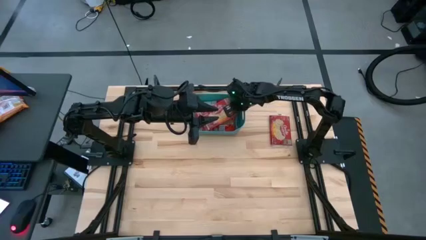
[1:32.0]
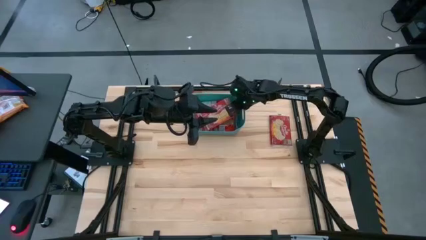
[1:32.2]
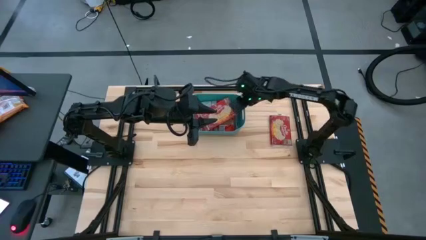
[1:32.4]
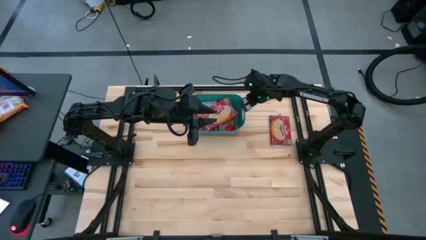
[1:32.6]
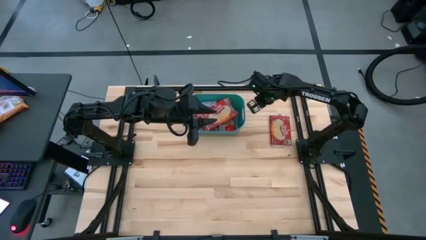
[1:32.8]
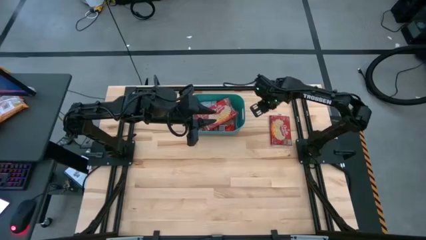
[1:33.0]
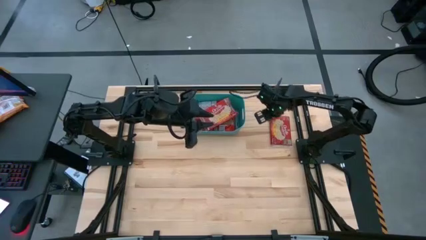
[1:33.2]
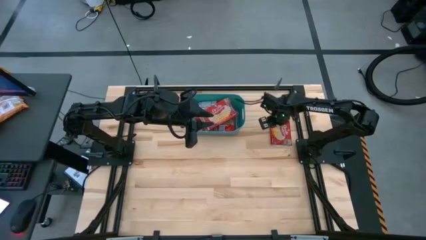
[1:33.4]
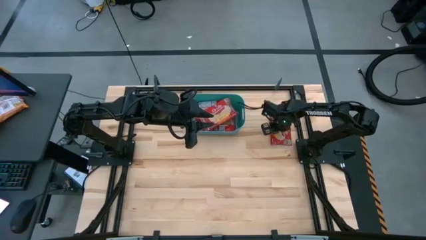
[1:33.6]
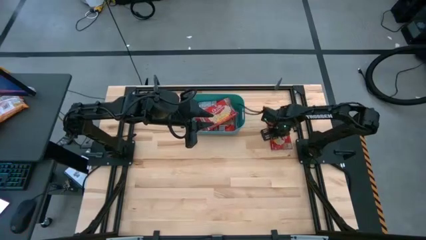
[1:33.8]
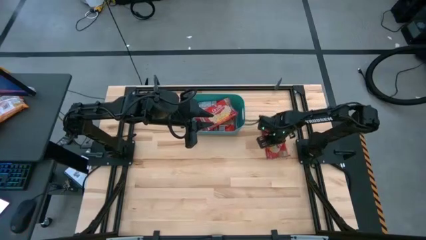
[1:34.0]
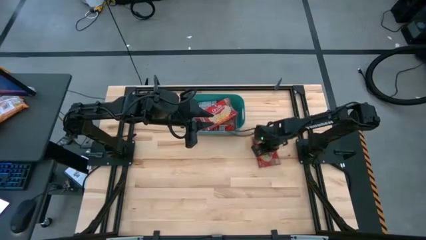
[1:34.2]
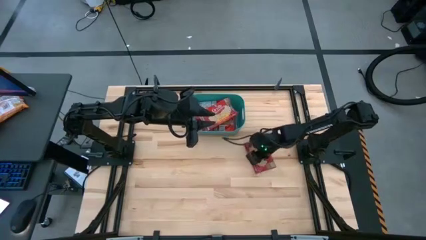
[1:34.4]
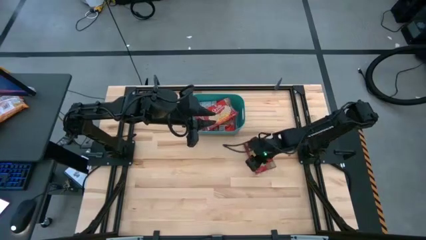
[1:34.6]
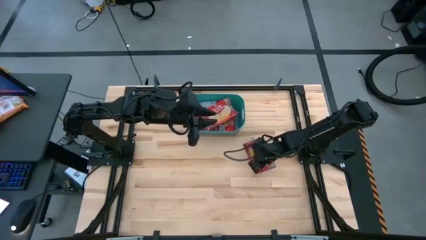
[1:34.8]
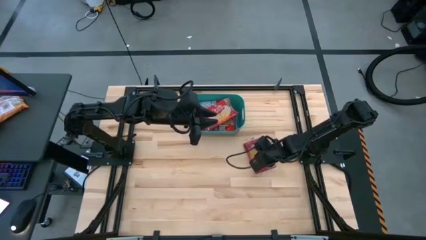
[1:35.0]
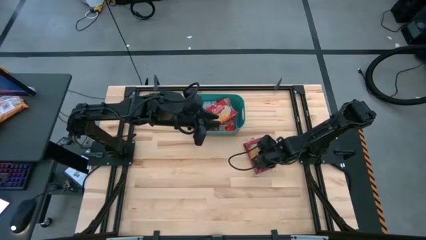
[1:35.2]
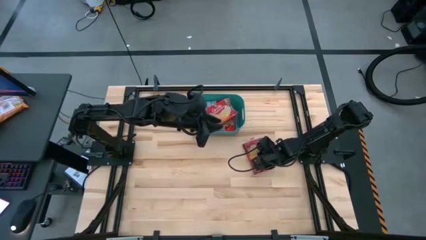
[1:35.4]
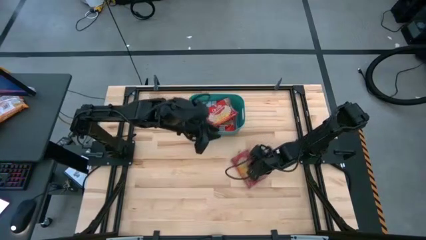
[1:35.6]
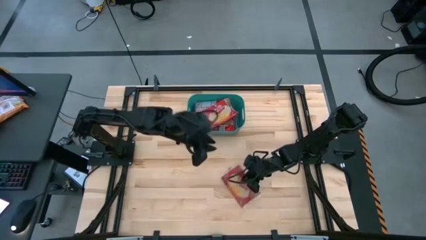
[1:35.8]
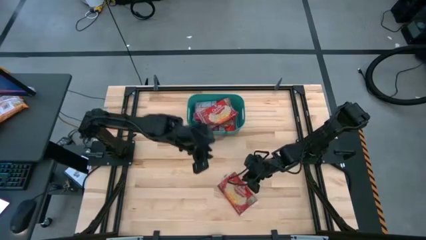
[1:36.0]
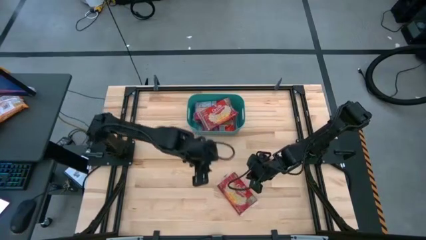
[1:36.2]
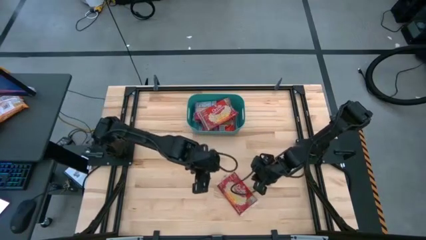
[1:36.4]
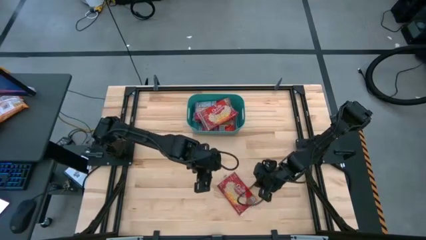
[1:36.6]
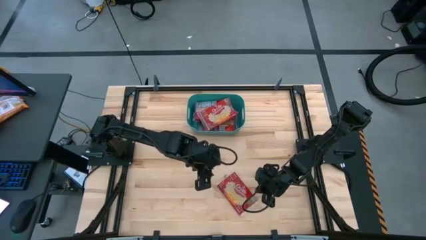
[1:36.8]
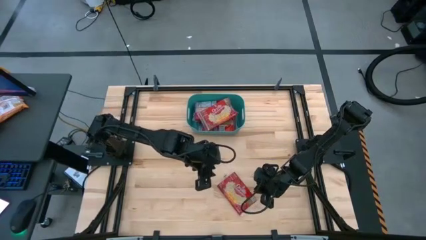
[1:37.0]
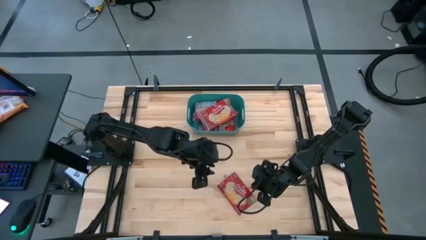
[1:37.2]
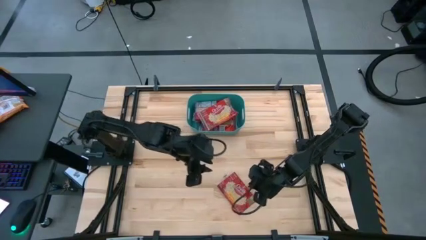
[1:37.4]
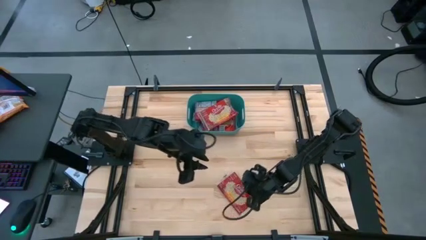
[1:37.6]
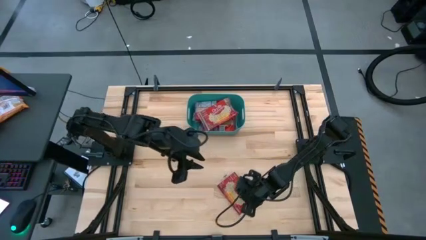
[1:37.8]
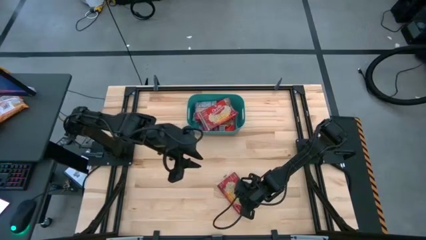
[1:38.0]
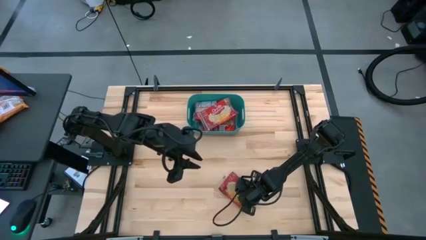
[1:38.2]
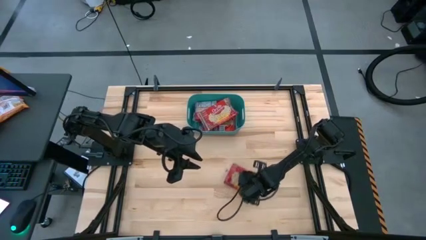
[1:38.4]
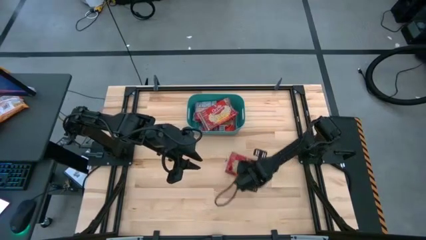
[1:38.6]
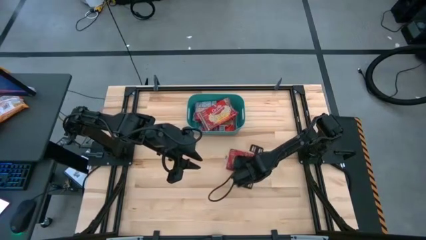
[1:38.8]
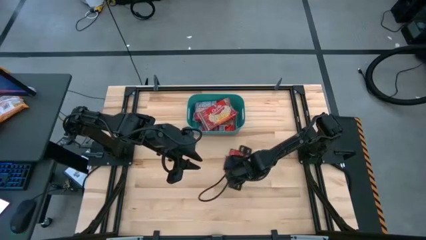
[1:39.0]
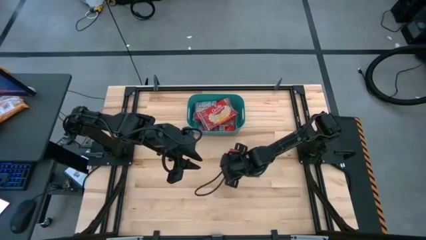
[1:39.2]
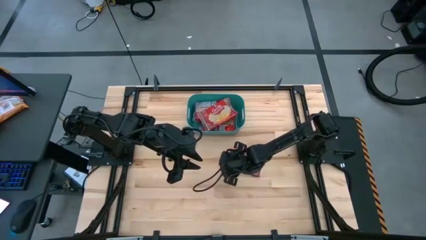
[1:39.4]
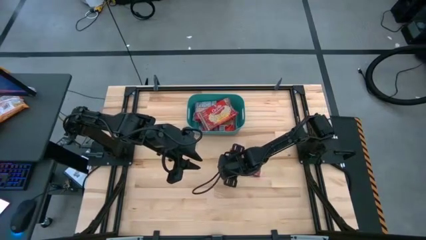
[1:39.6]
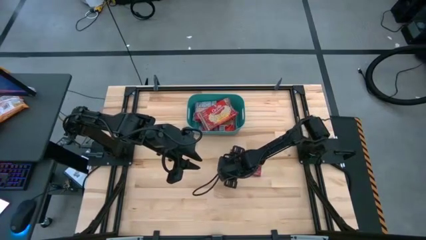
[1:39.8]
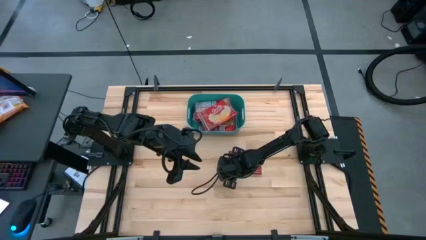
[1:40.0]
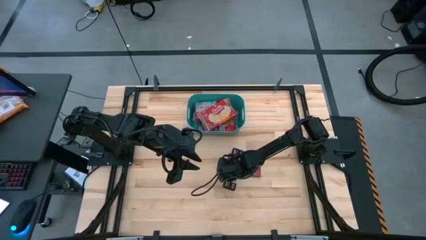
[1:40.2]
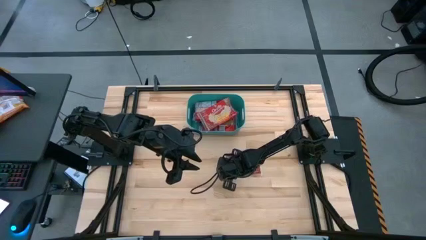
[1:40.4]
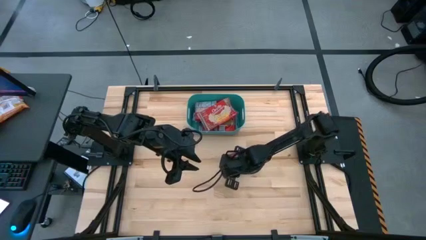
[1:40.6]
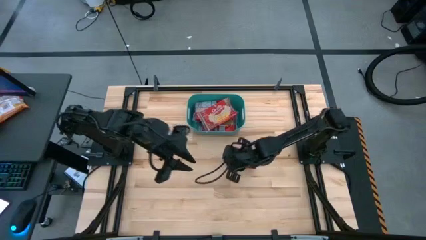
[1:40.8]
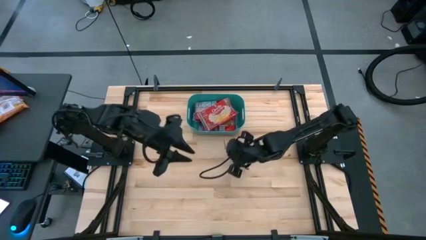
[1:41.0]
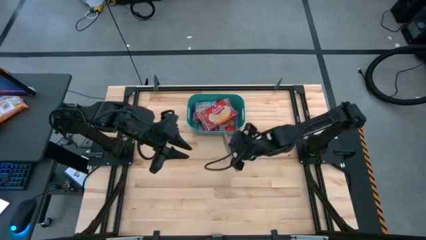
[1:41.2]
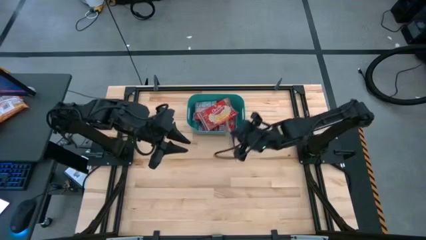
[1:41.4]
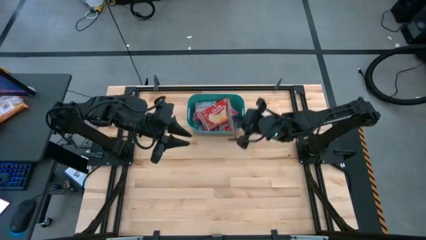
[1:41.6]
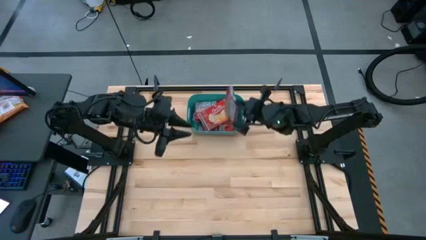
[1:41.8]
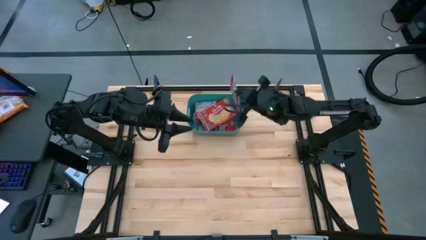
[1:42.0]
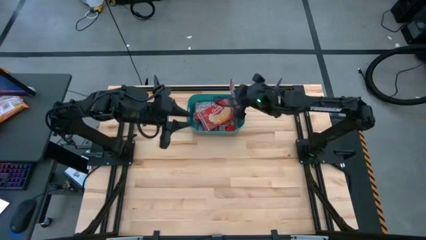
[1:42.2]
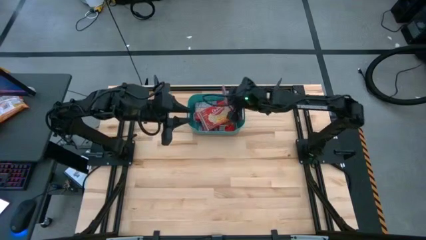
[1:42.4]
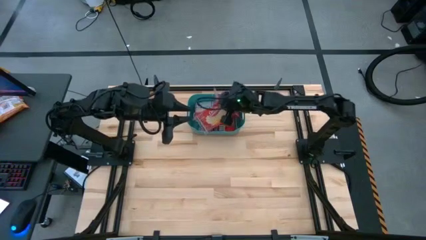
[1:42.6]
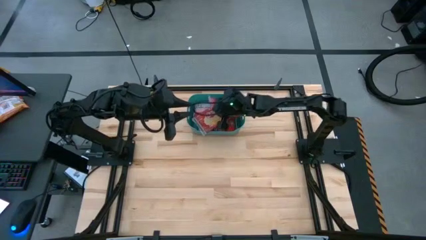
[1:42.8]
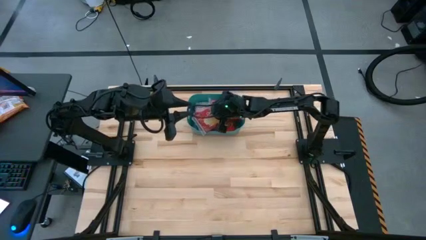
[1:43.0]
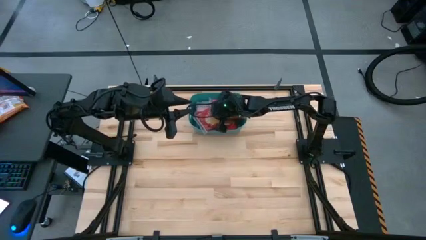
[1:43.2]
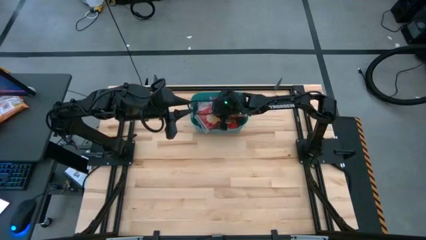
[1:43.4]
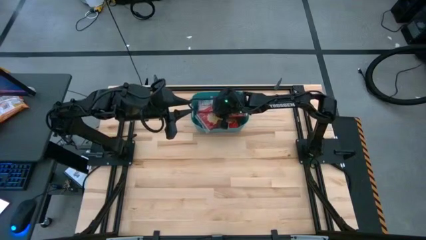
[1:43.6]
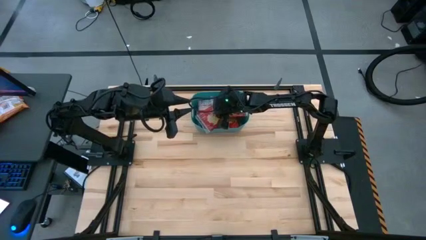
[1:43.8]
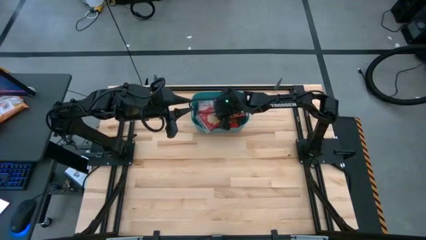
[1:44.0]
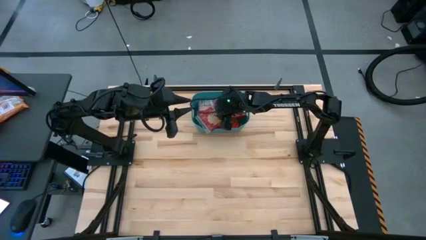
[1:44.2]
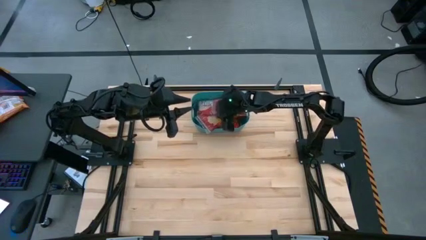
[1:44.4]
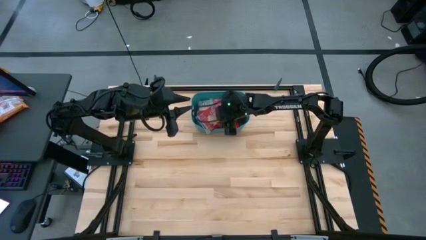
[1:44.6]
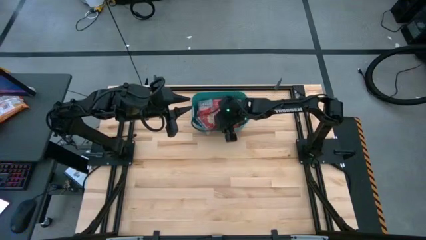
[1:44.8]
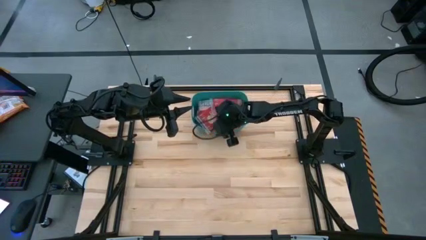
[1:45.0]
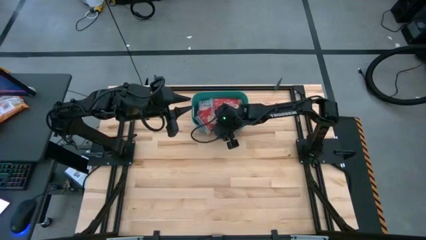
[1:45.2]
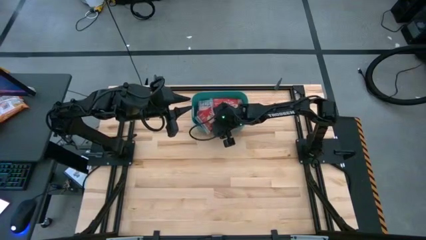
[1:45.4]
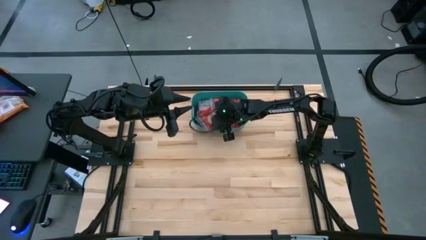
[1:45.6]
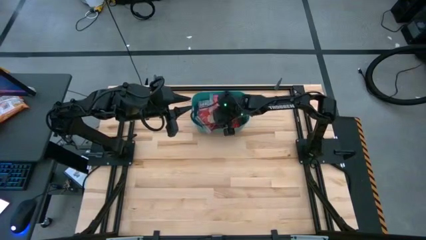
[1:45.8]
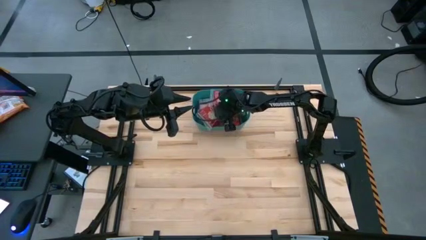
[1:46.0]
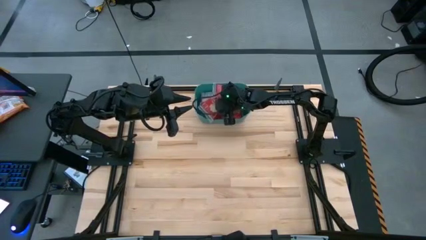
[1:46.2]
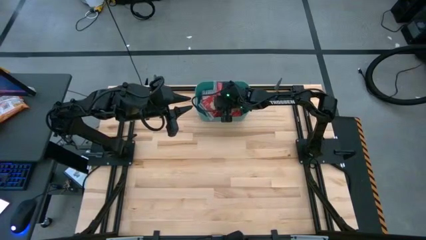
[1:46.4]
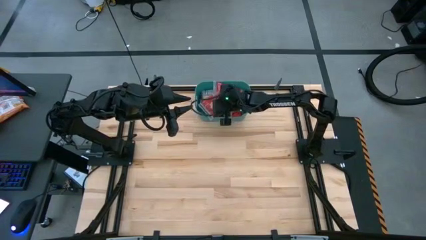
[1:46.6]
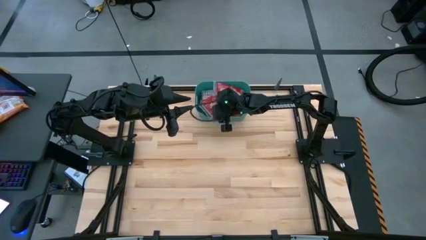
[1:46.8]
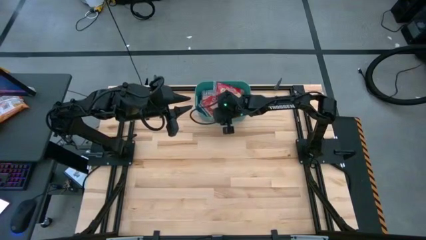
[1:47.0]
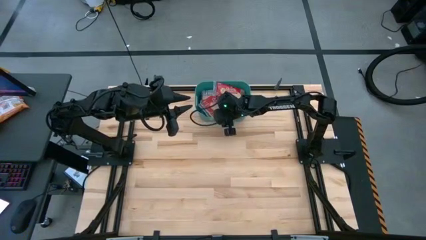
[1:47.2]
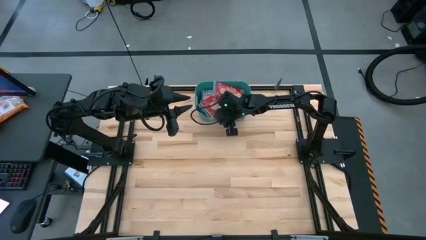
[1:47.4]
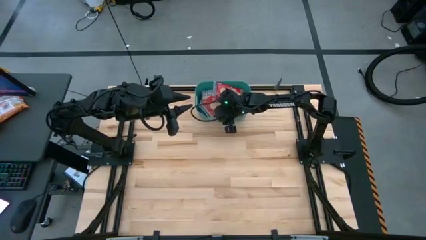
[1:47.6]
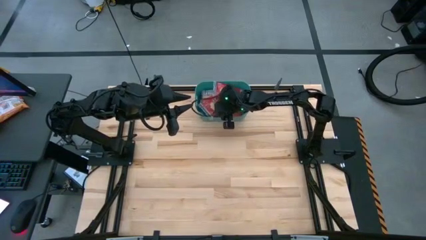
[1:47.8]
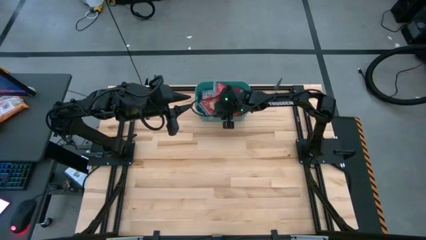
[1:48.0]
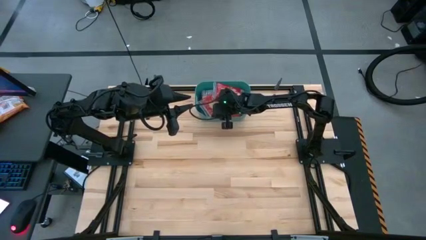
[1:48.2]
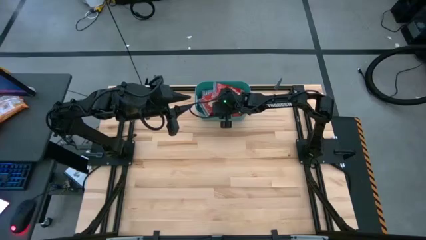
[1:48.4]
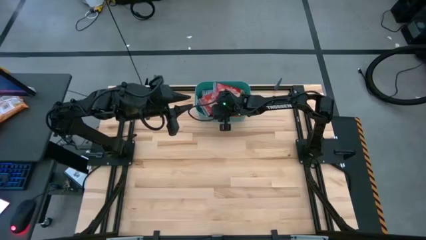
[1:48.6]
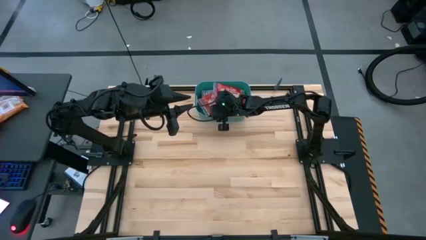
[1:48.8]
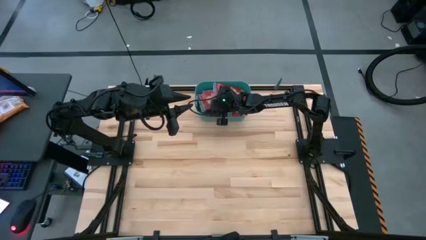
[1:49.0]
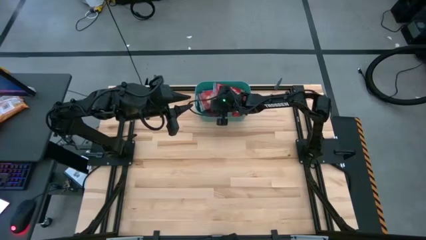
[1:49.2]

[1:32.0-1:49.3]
Task: Sort popcorn bags into baskets
Put the red popcorn bag into the blue bin
